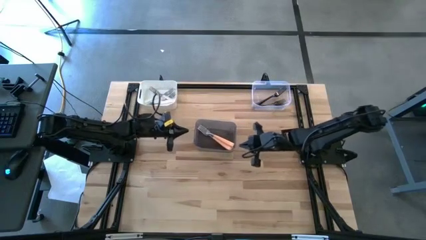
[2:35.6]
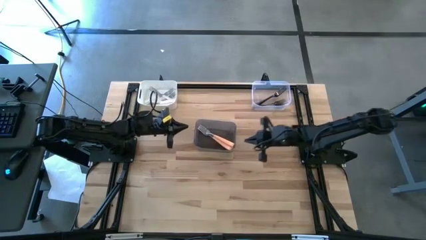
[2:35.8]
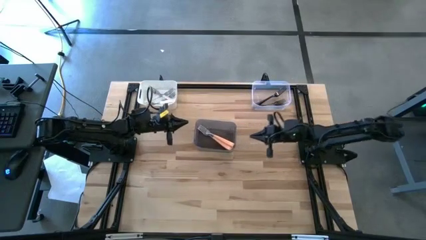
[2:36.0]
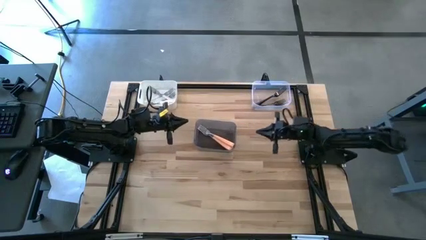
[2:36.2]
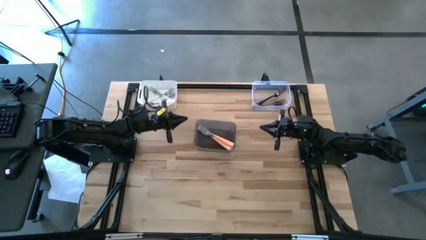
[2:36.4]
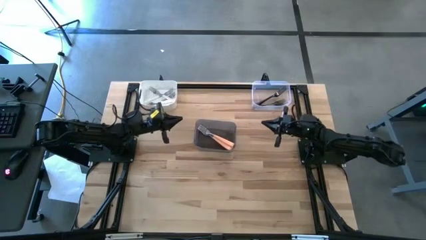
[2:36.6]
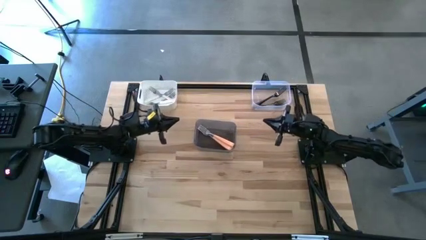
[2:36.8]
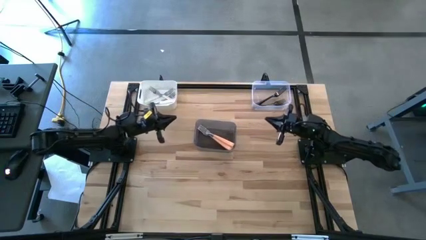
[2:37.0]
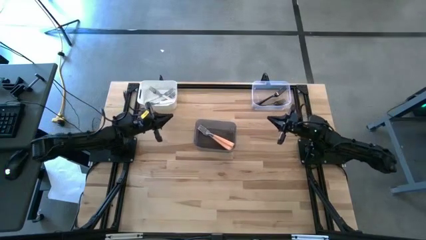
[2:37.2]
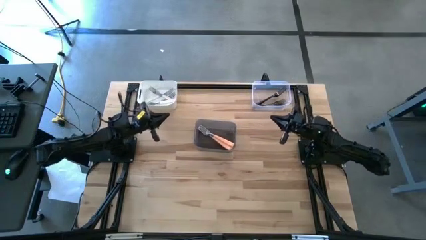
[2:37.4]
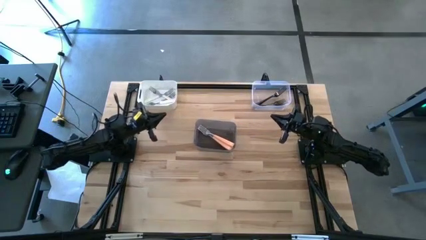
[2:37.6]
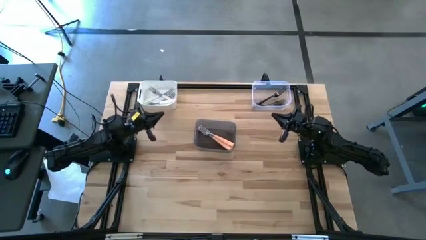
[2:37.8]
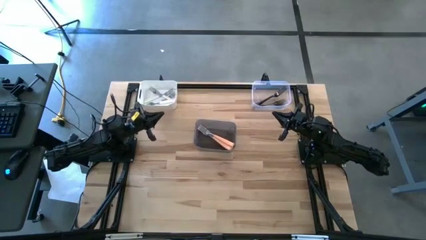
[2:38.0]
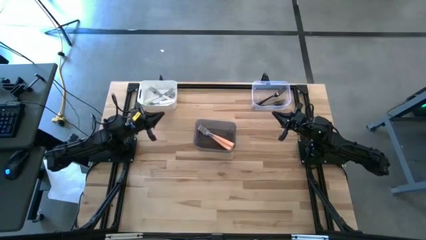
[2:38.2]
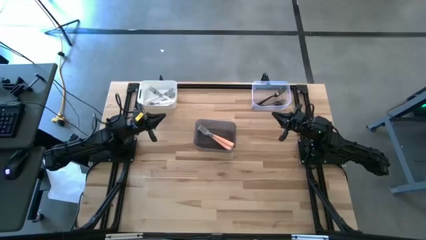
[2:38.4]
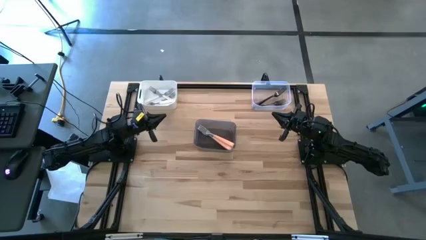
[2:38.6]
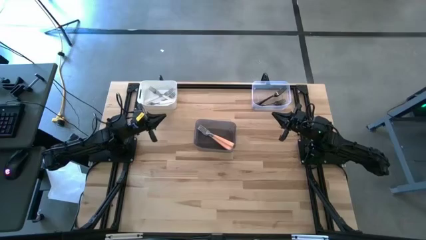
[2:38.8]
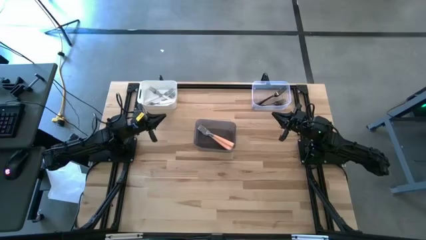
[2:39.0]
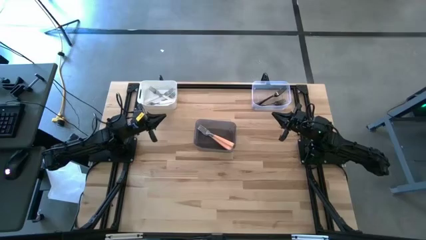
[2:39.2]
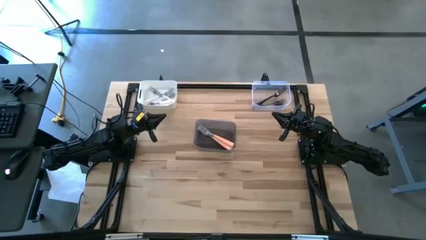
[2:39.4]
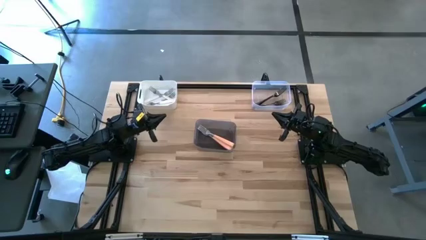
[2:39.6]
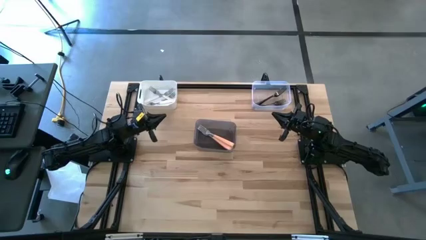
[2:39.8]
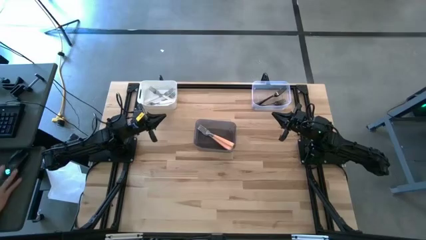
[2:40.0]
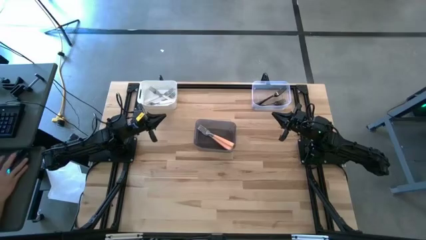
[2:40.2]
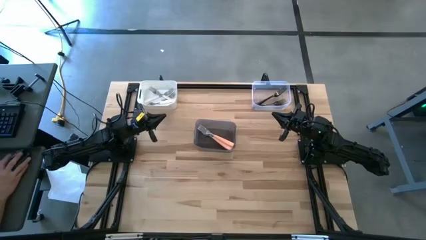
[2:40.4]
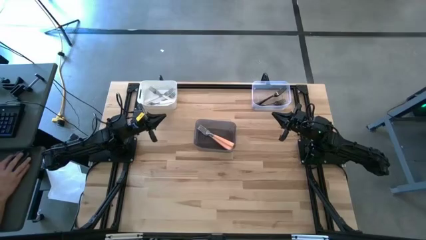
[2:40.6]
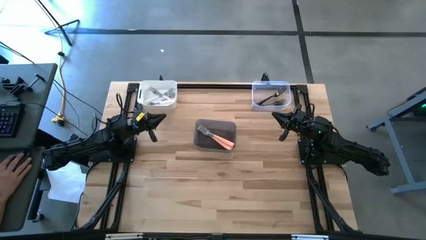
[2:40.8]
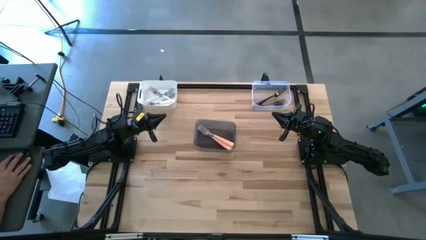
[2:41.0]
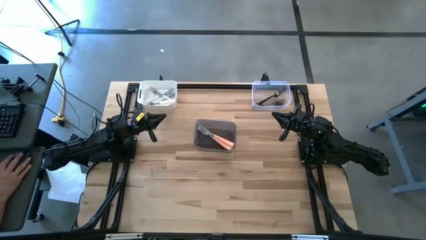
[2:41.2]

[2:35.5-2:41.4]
Task: Sort silverware by color (type)
Return to Home Position

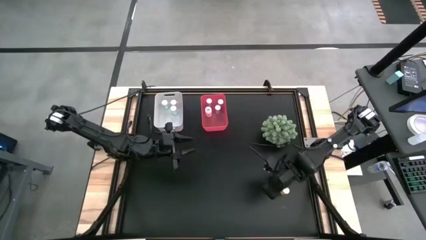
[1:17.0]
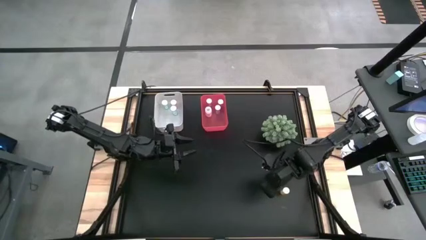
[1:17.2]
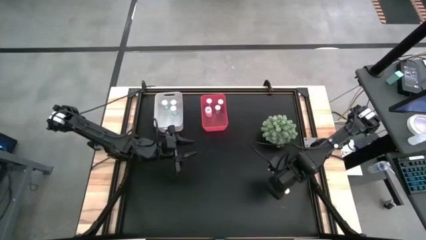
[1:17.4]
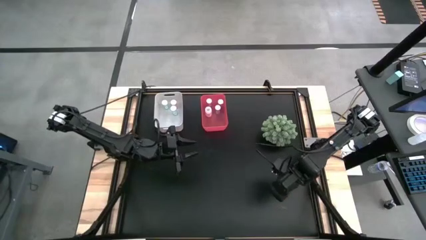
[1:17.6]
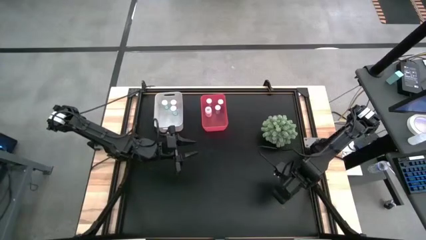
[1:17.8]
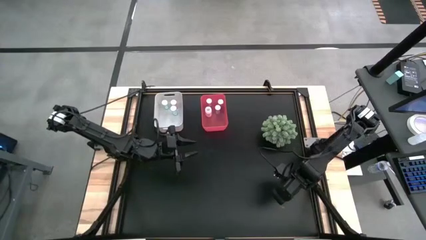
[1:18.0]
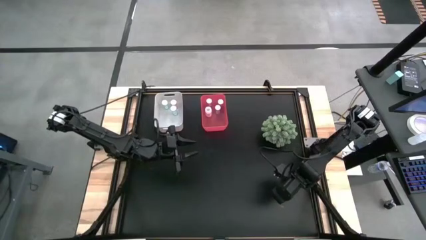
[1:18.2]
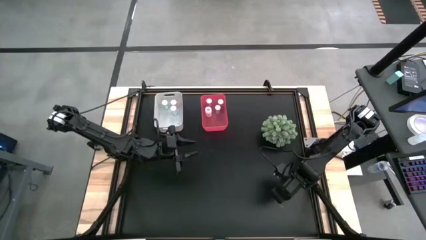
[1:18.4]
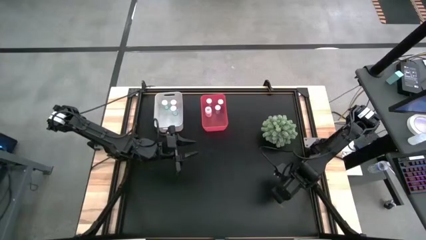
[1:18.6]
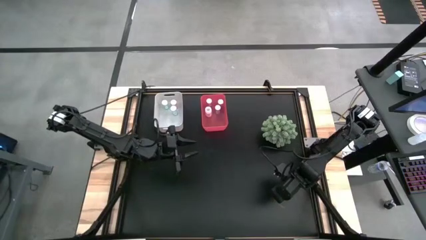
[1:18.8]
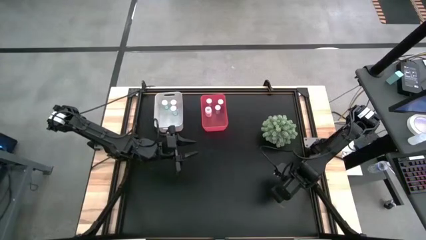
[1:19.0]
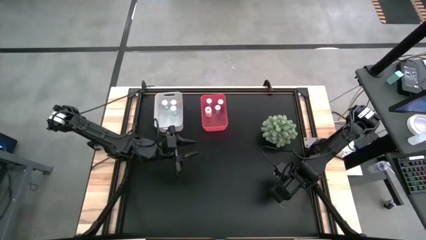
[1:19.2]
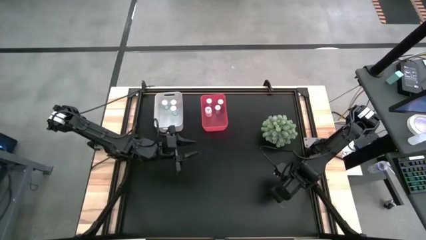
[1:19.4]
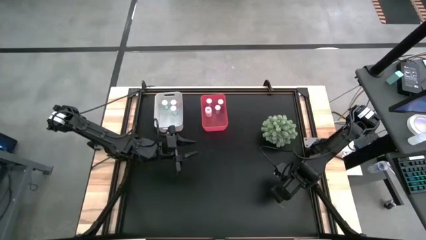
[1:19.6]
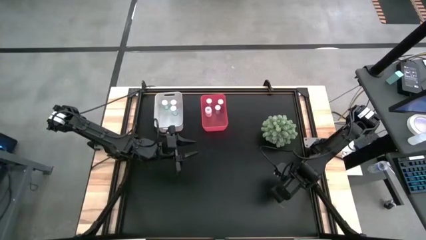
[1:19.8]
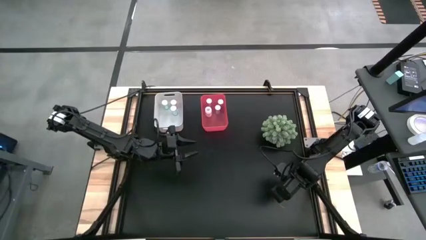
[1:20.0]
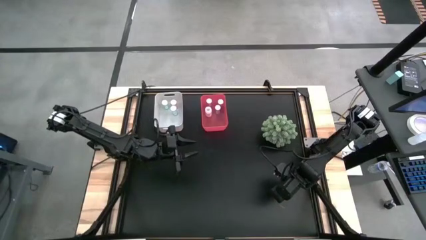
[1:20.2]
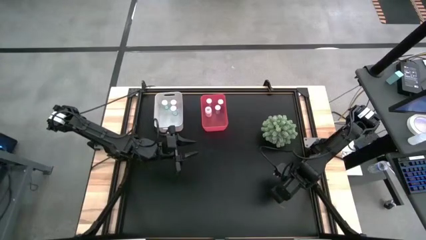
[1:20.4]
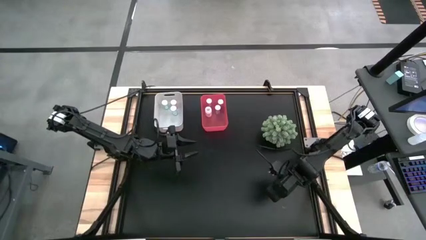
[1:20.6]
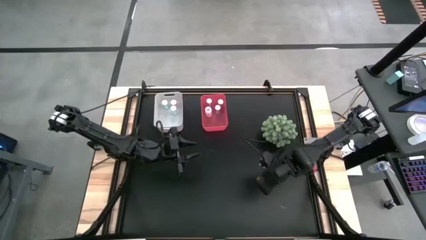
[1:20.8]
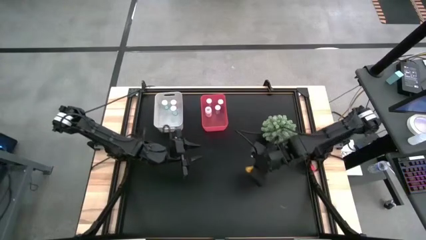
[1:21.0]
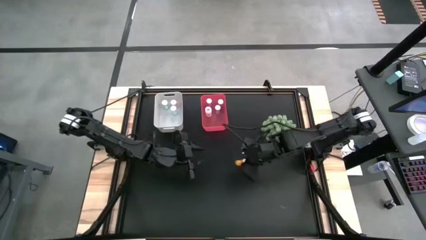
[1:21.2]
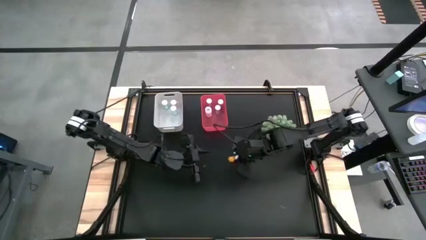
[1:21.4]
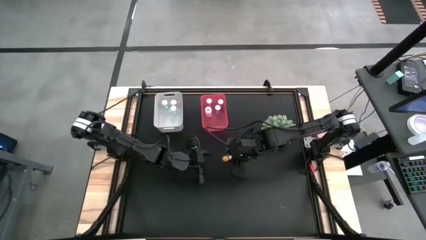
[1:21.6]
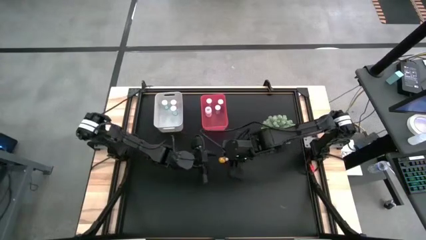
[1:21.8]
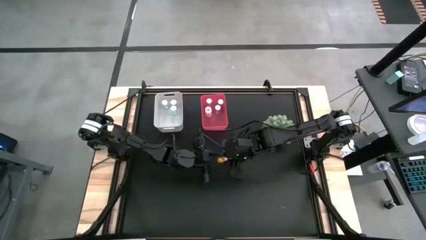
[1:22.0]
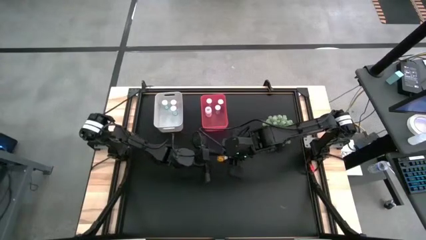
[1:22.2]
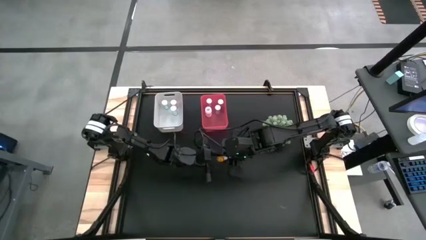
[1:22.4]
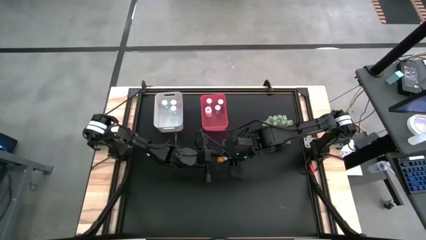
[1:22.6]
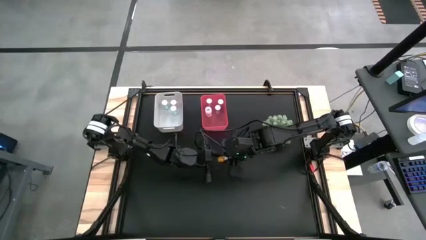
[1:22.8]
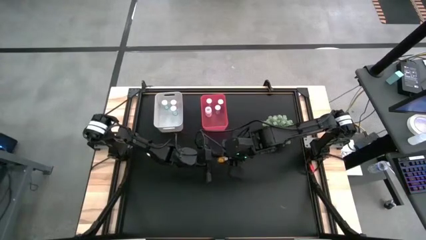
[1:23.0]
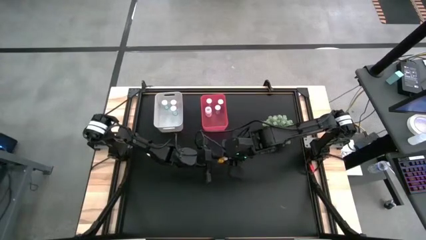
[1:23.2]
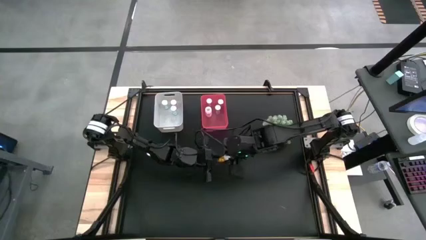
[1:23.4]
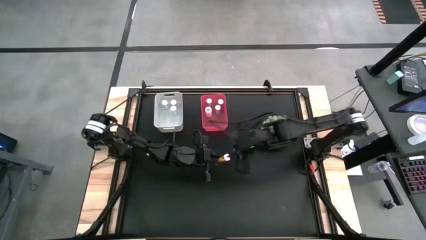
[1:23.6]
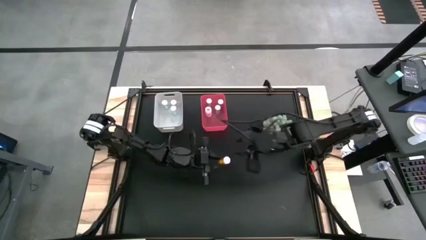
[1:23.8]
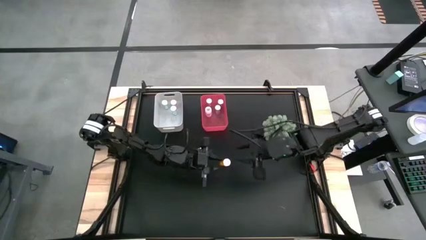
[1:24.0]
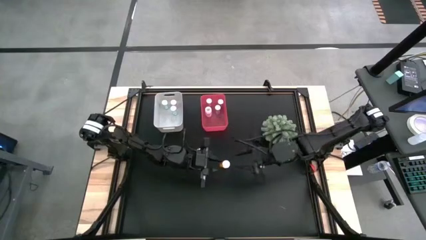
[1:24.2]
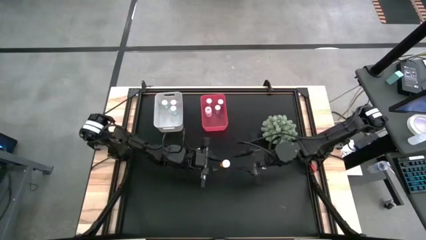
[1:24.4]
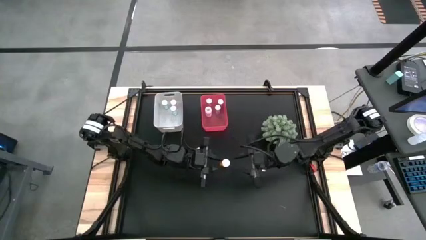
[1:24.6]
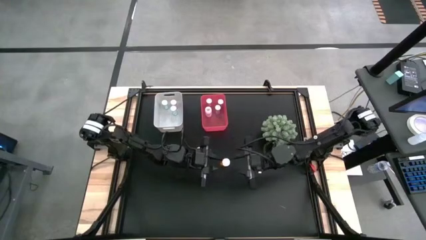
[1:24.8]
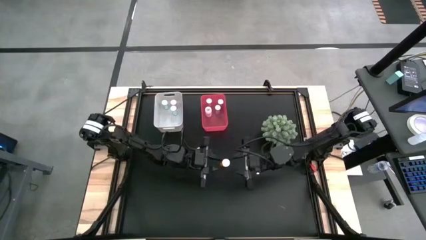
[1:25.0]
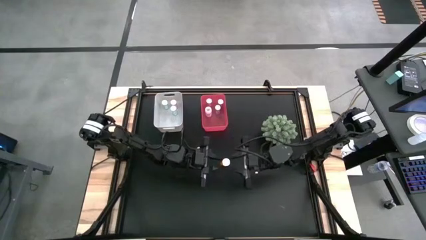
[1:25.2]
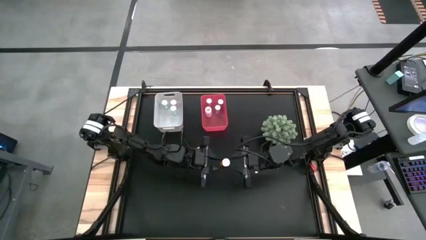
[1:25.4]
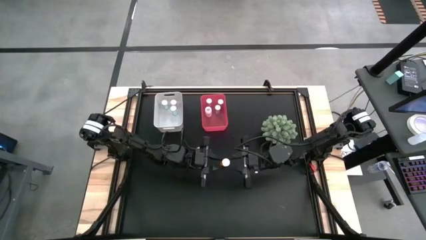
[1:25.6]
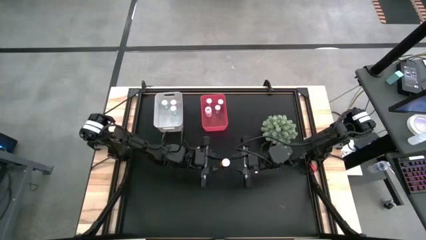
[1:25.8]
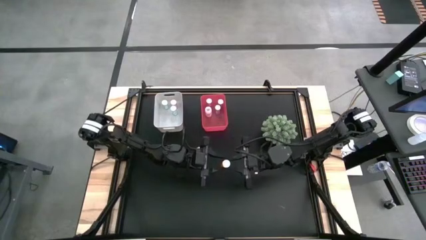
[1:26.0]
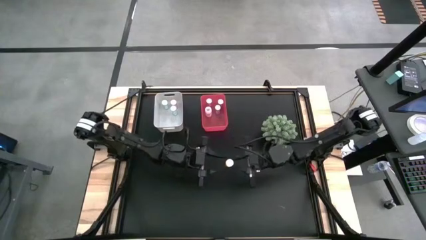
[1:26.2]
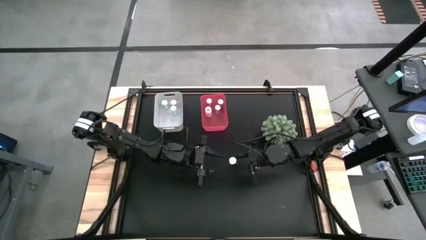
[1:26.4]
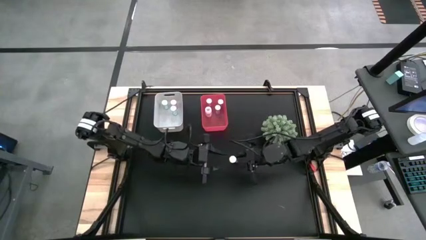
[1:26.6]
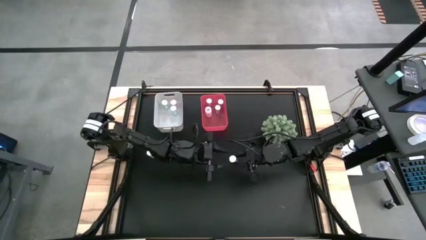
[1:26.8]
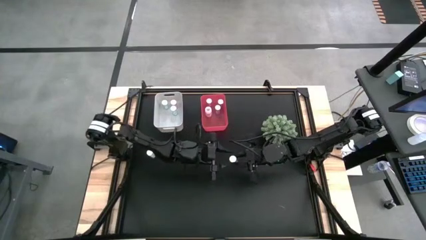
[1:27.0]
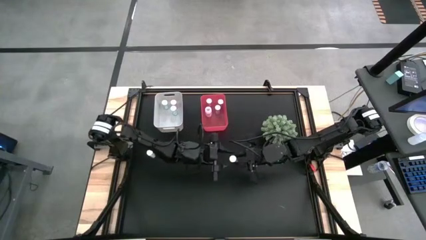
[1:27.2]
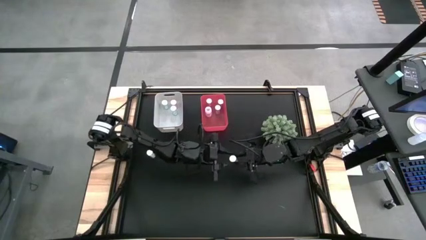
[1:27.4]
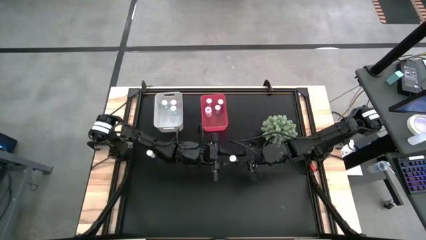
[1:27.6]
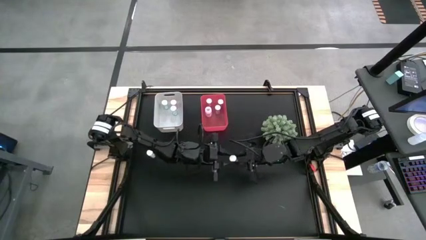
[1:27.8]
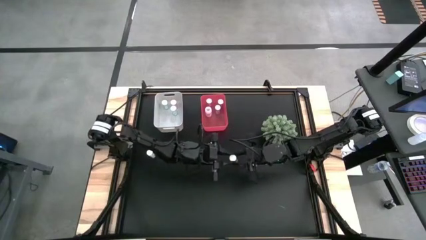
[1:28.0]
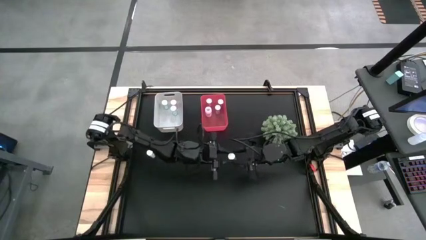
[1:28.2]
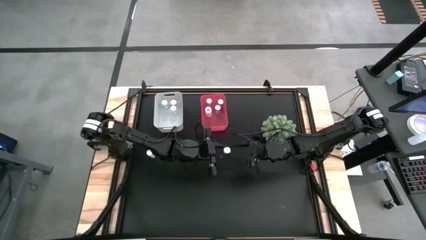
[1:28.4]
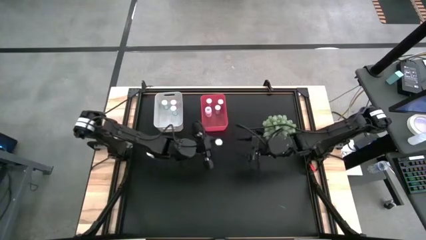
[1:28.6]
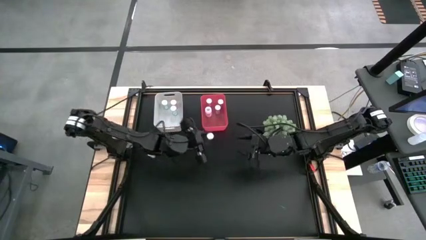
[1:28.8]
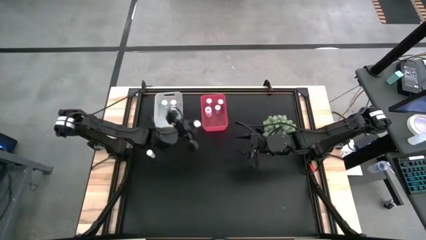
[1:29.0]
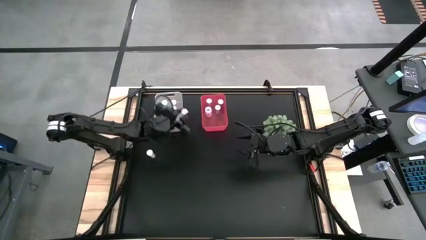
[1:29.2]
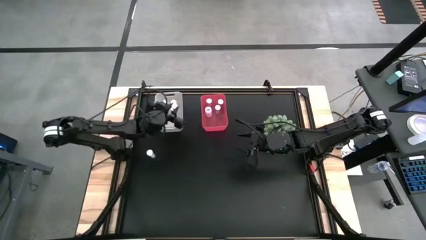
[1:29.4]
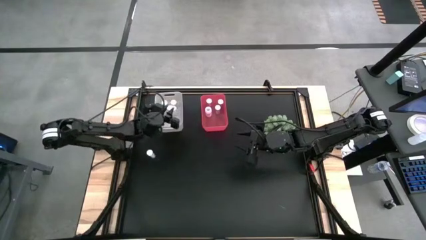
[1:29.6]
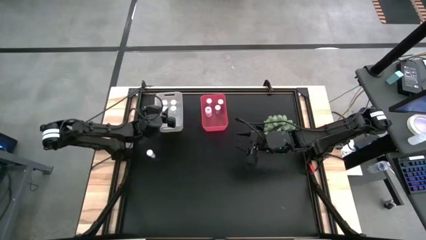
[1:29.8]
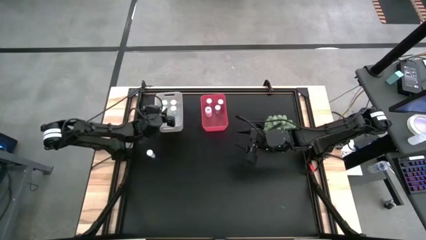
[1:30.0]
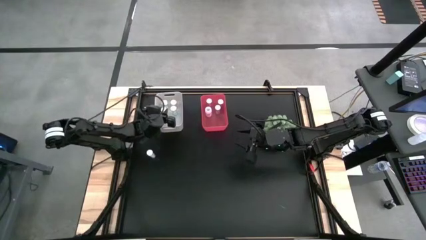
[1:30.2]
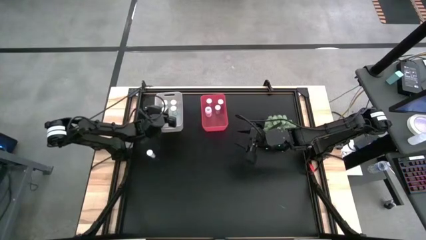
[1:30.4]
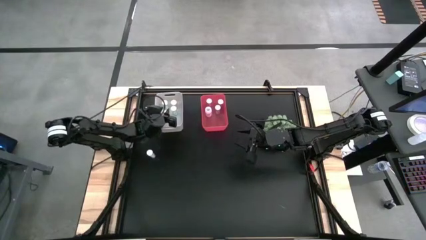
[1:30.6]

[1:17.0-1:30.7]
Task: Pick and place medicine bottles into bin by pill shape (circle, oval)
Put the orange tablet bottle into the white bin
